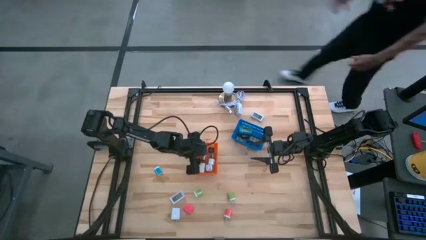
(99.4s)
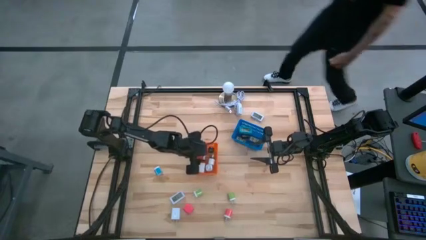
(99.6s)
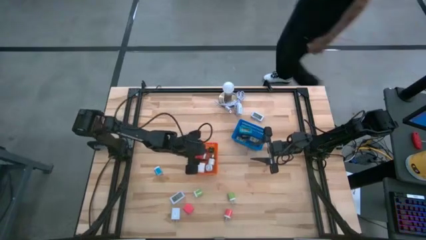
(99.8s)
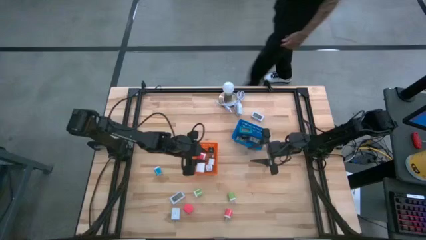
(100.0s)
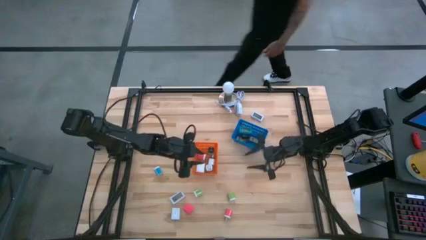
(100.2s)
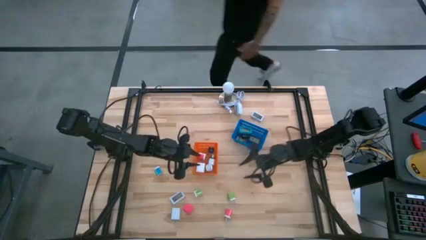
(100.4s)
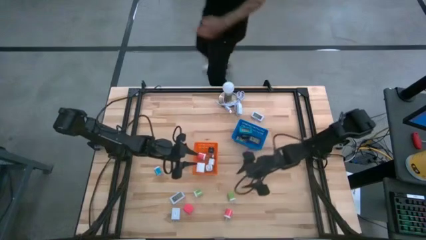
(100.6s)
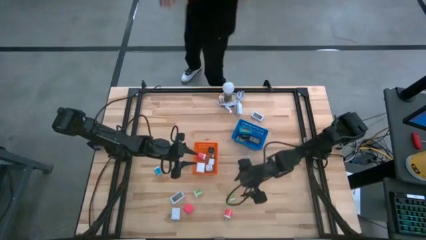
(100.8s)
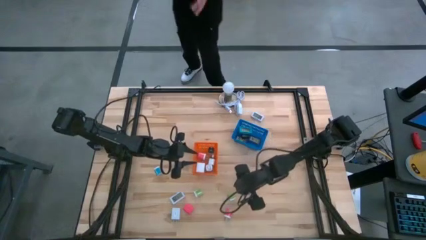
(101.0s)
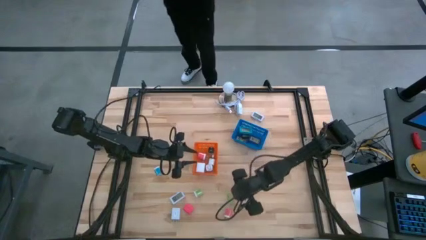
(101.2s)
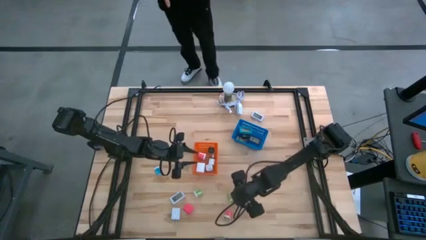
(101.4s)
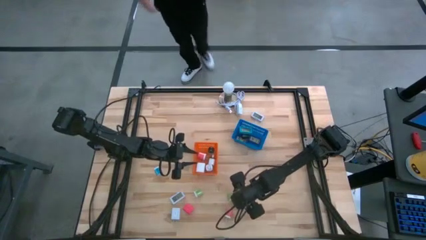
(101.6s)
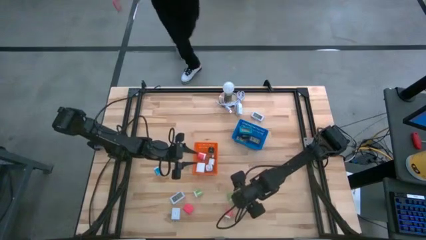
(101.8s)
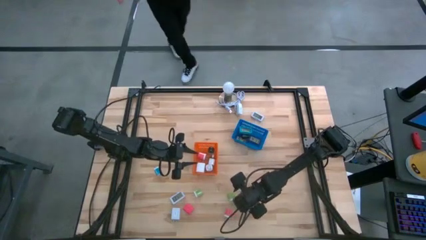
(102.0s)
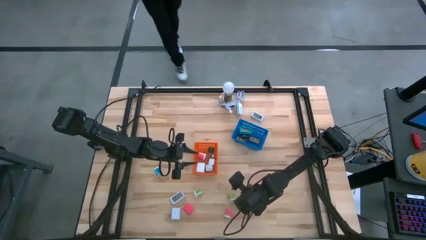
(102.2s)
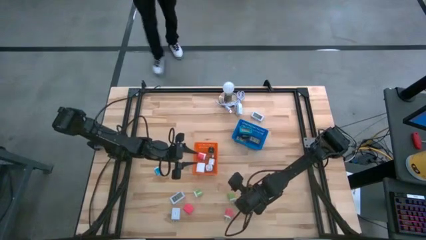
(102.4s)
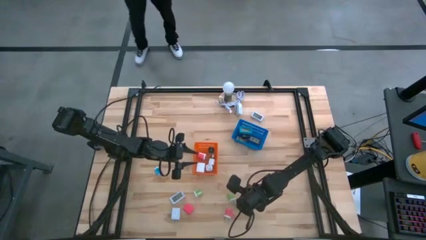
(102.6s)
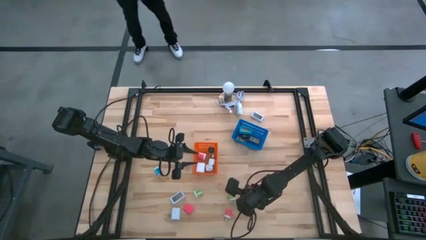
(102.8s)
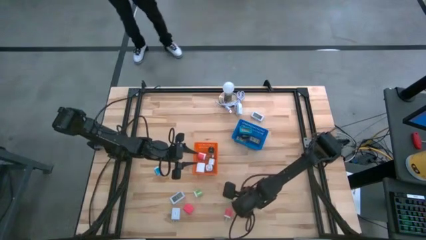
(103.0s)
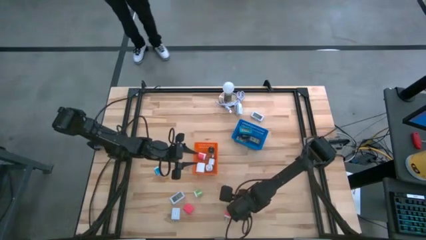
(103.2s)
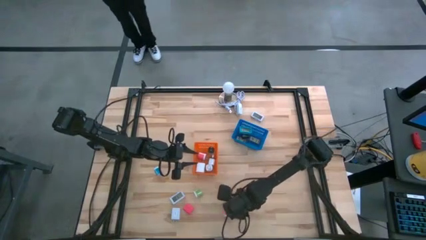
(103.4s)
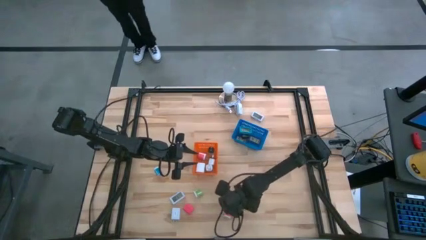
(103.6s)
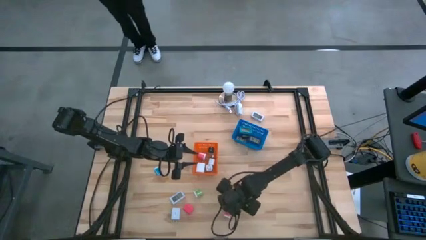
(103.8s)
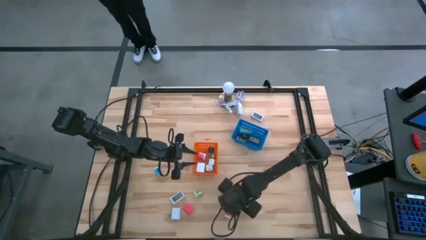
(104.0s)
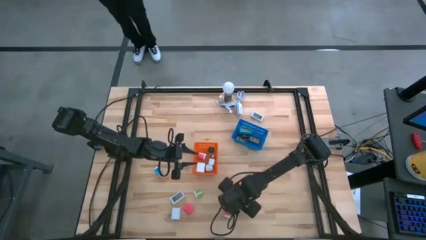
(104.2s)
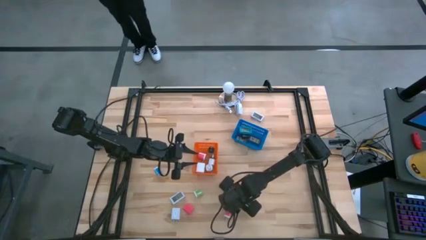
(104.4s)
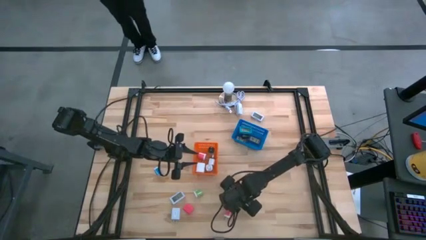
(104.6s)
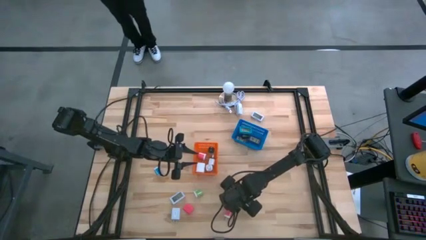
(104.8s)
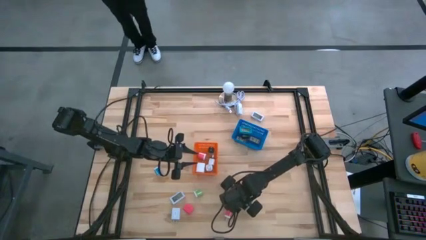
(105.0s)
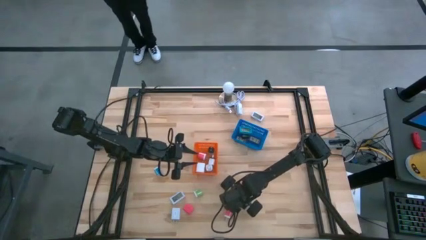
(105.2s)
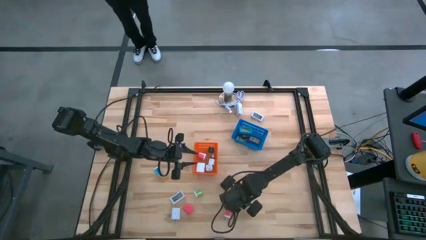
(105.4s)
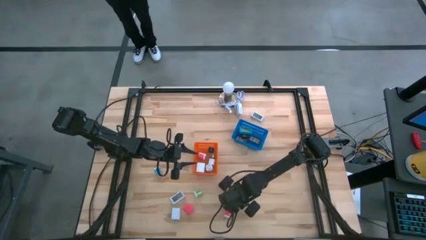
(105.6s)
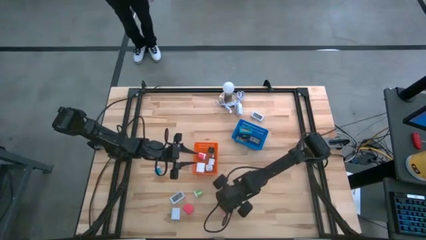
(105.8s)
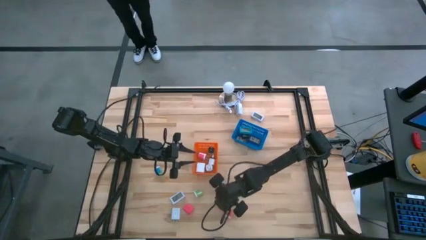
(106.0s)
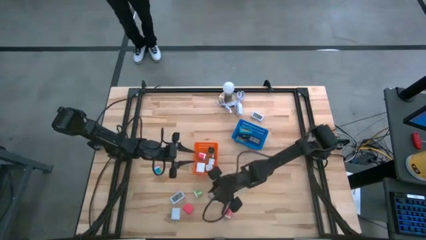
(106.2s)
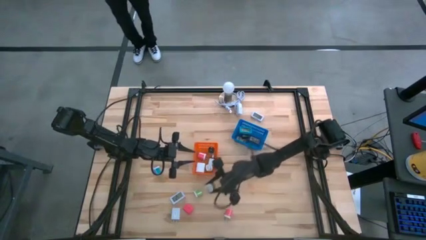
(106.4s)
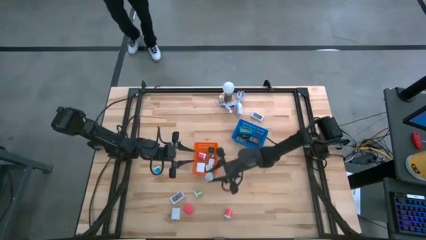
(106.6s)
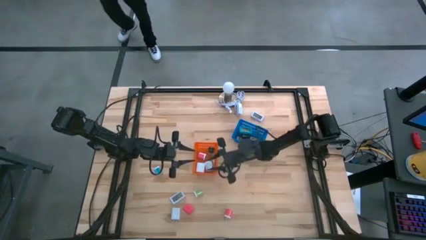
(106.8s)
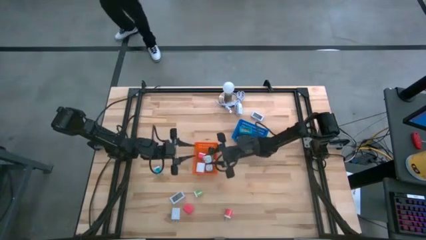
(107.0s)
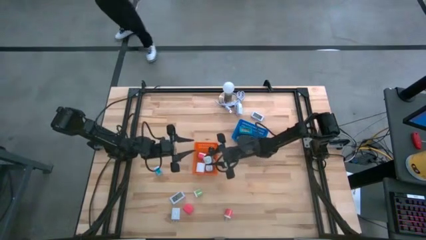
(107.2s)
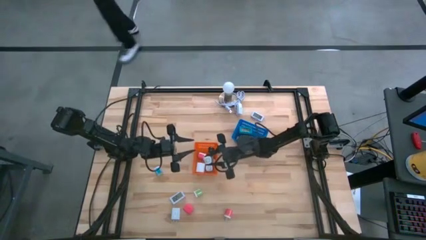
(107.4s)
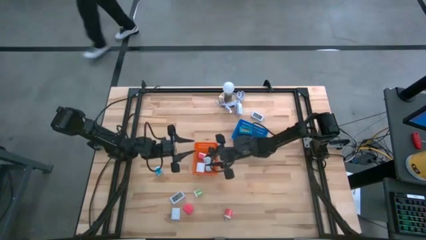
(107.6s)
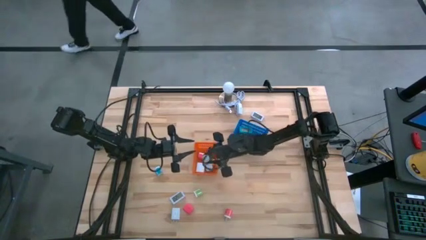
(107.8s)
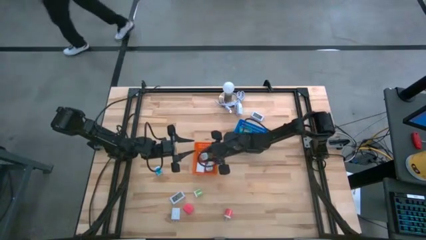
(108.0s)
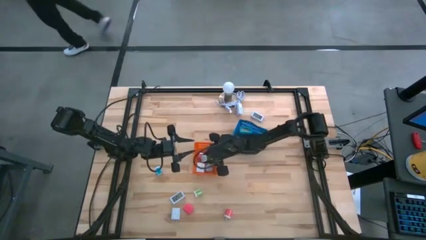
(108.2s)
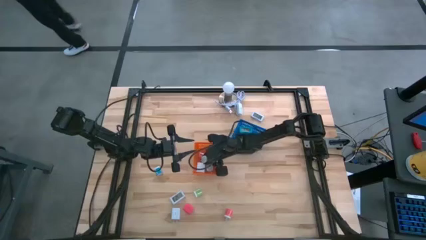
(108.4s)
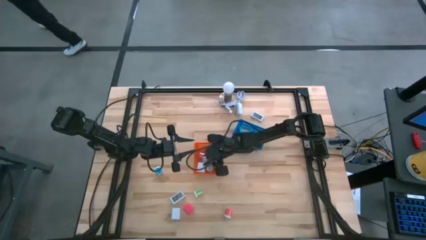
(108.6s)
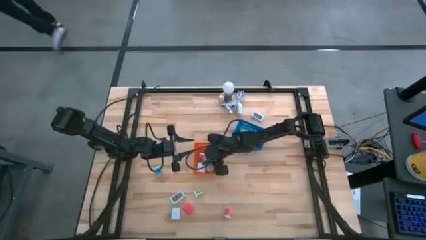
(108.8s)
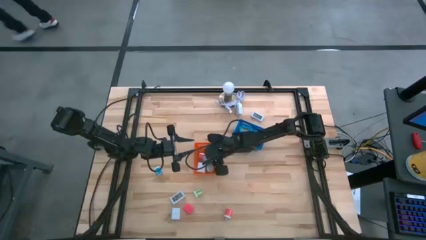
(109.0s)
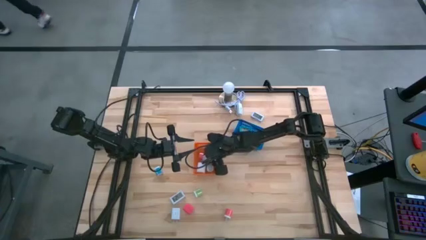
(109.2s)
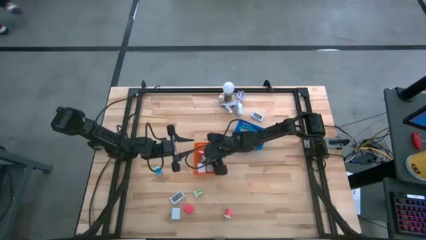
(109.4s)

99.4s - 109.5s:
Task: Pick & Place Office items
Put the right green charger adapter into the orange bin

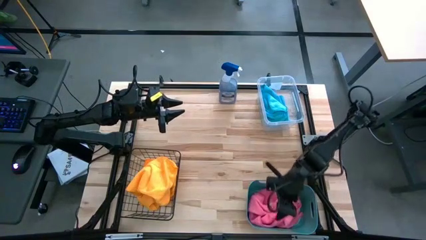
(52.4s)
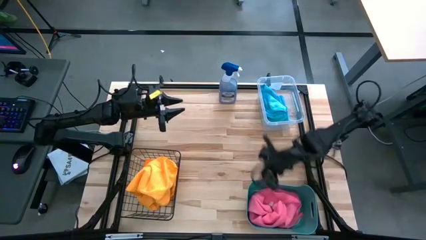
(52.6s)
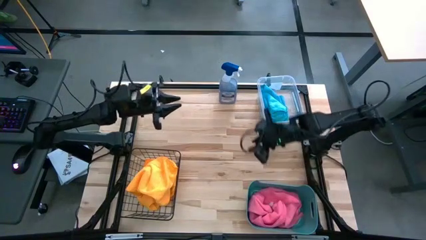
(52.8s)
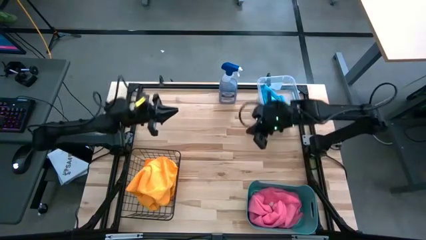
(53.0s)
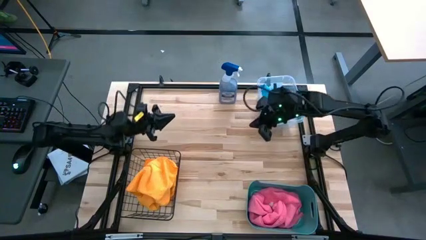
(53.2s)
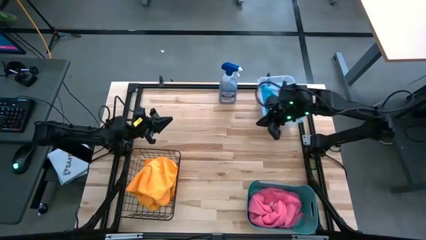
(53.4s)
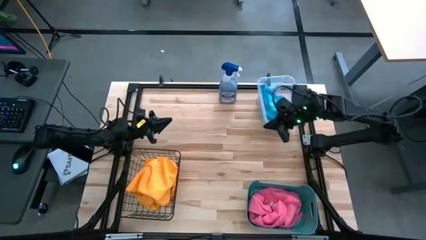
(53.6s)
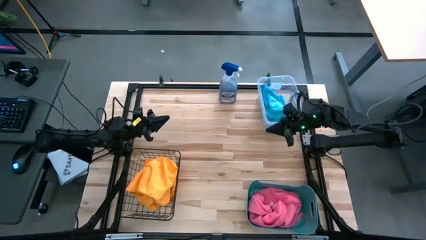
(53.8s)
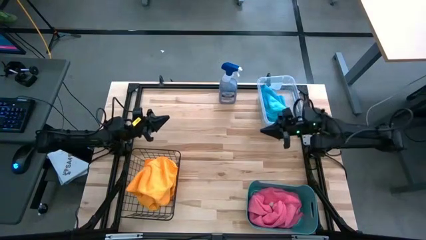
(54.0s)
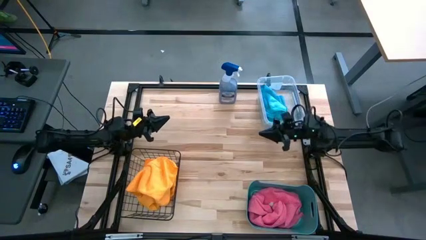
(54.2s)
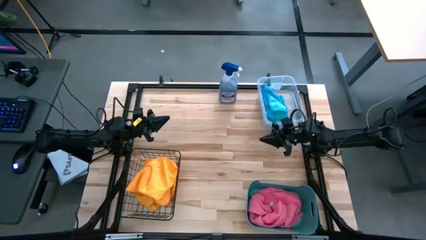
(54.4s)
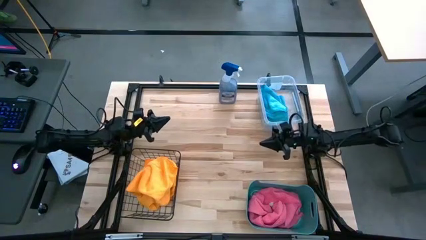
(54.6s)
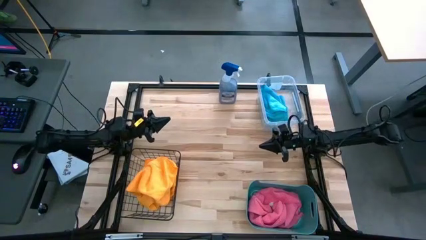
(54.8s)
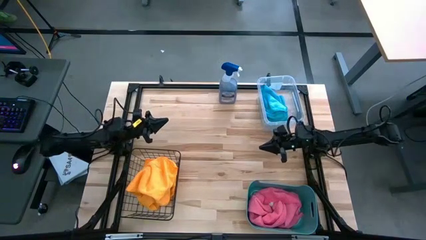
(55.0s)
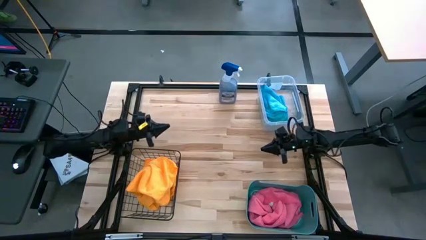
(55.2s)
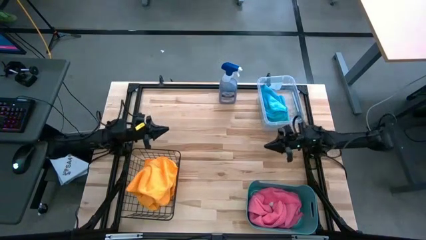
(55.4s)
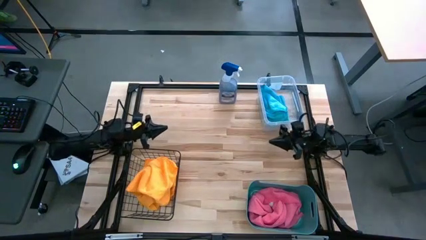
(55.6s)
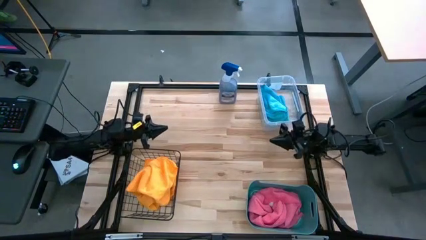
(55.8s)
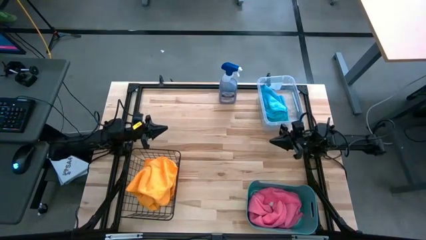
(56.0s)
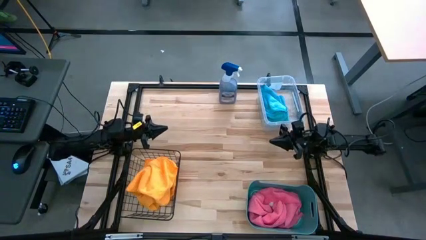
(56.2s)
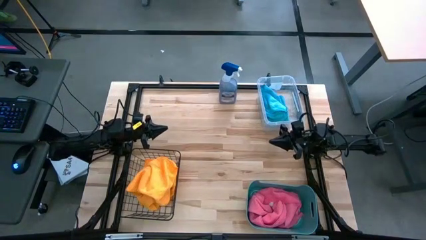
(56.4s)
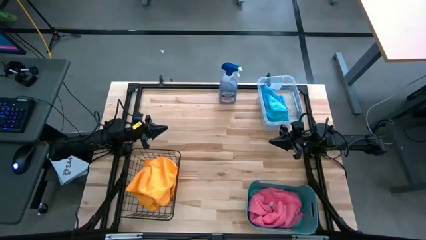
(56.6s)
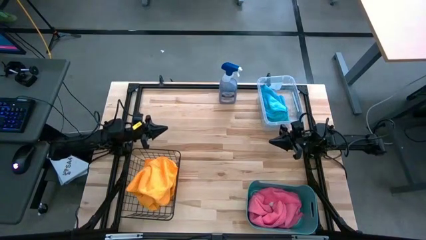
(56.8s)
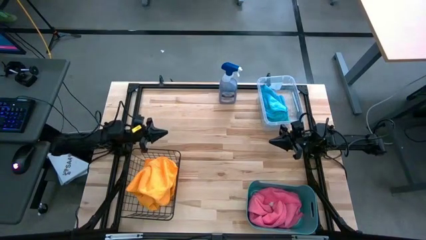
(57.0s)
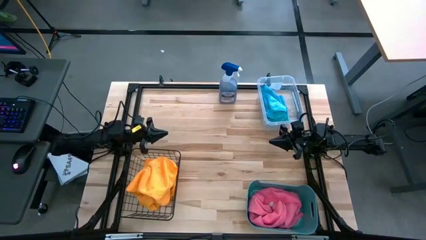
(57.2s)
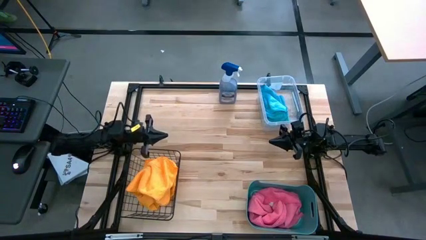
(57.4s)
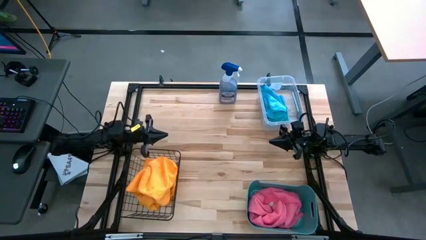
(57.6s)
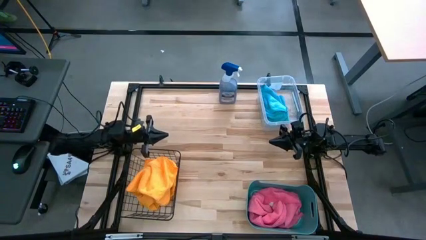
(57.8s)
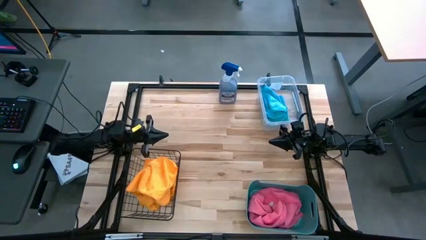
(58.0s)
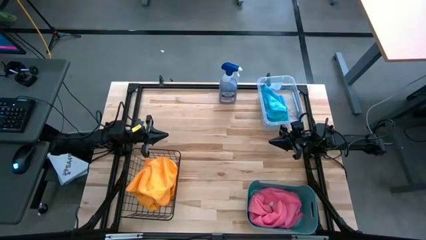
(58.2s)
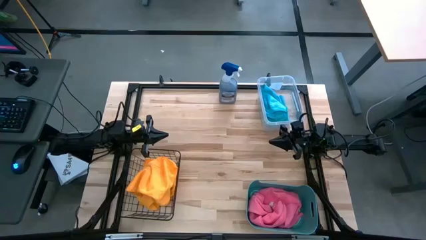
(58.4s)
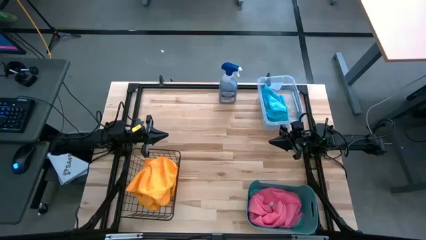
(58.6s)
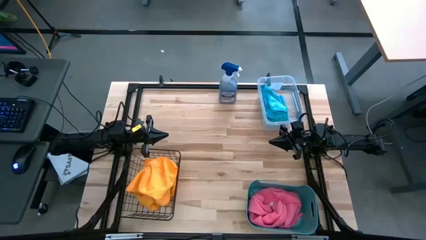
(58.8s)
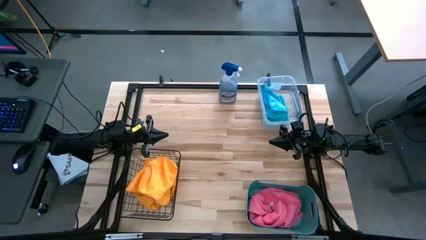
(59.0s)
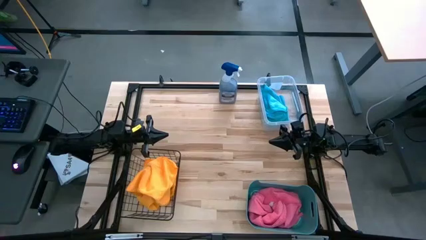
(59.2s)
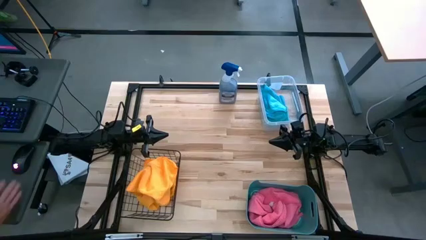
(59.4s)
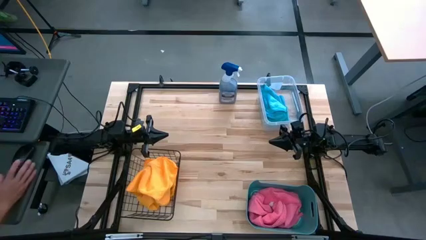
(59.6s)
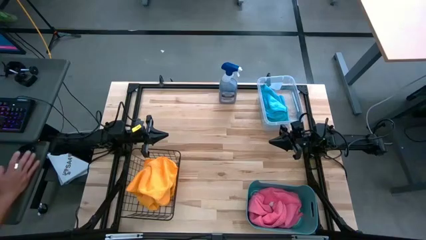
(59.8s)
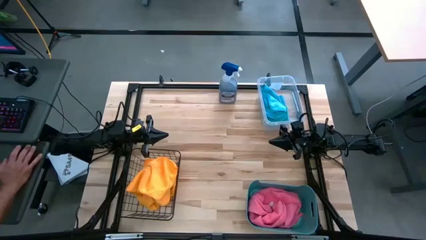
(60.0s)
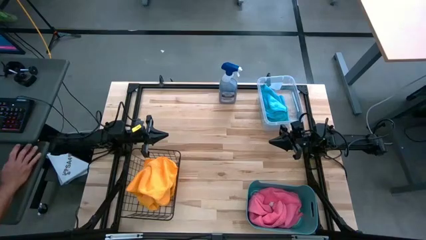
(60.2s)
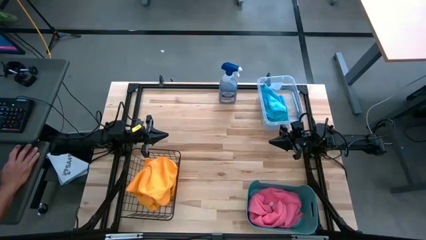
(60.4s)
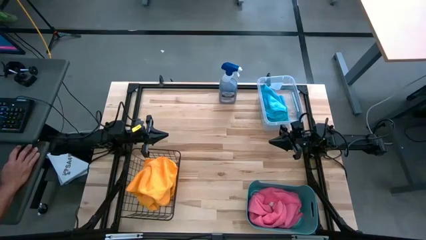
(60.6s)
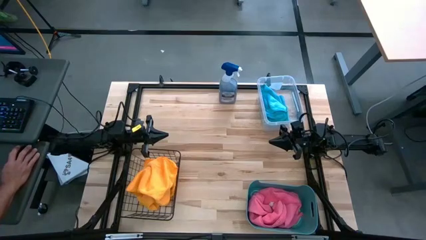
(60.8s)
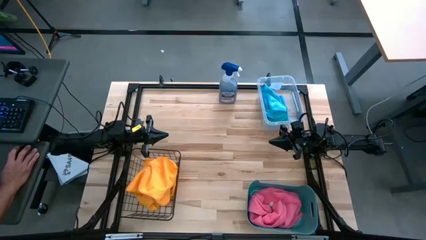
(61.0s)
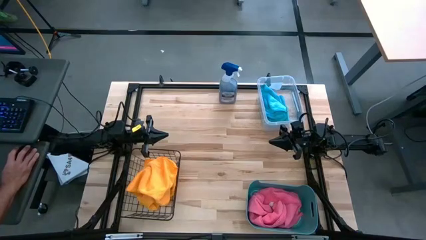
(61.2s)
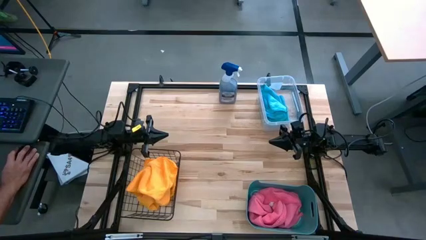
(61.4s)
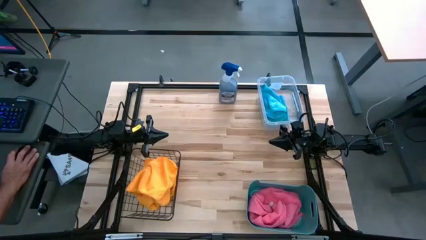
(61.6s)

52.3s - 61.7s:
Task: Sort microfiber towel by color & place in baskets
Return to Home Position
